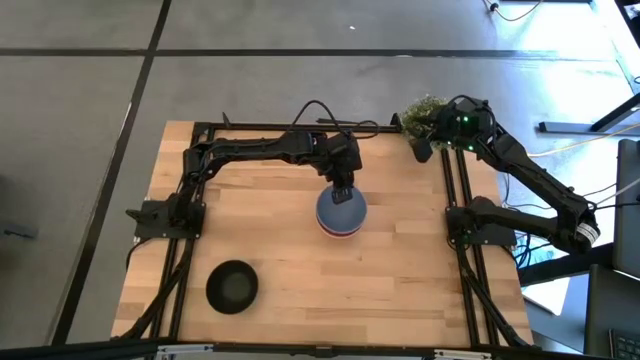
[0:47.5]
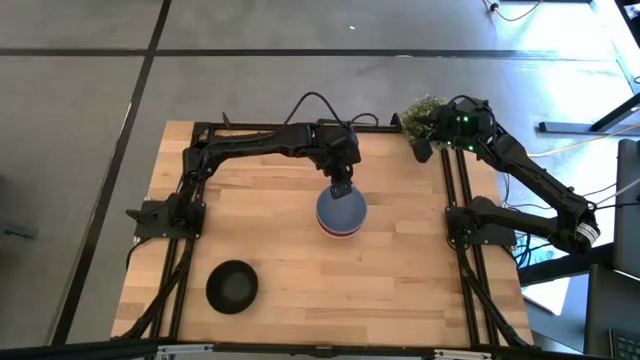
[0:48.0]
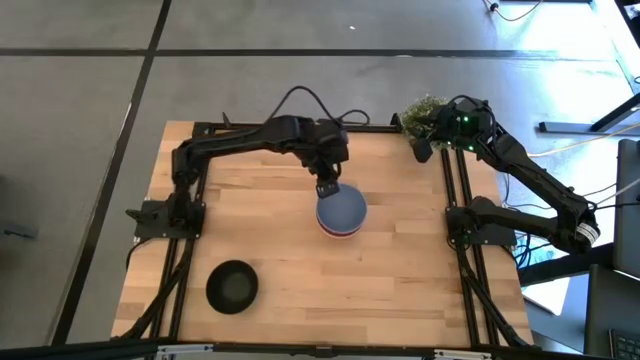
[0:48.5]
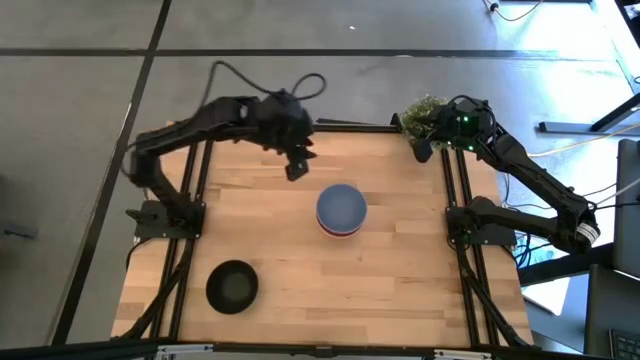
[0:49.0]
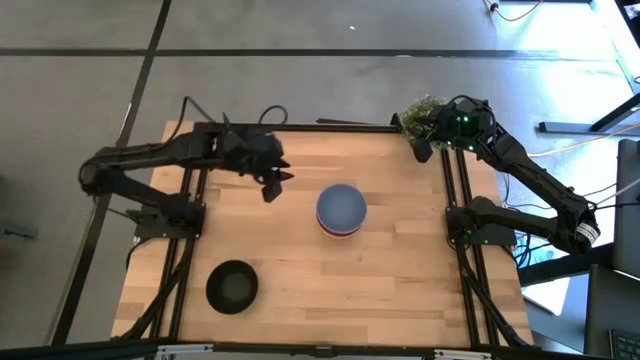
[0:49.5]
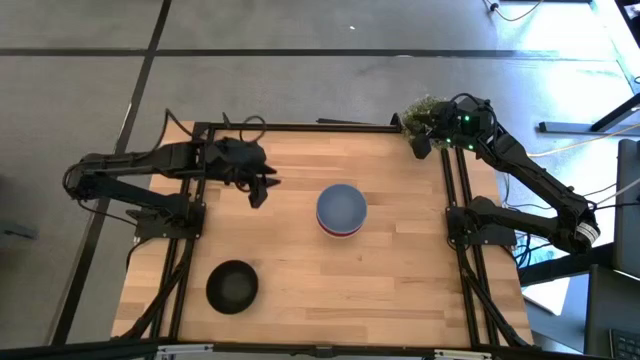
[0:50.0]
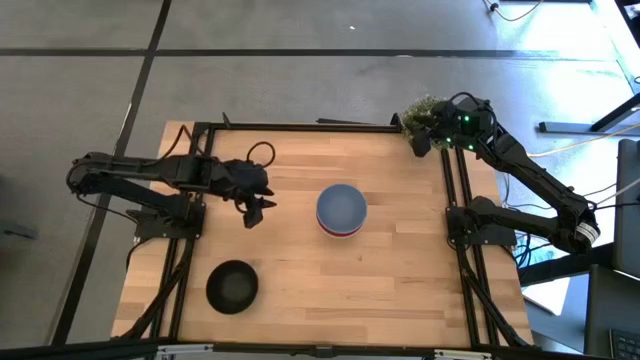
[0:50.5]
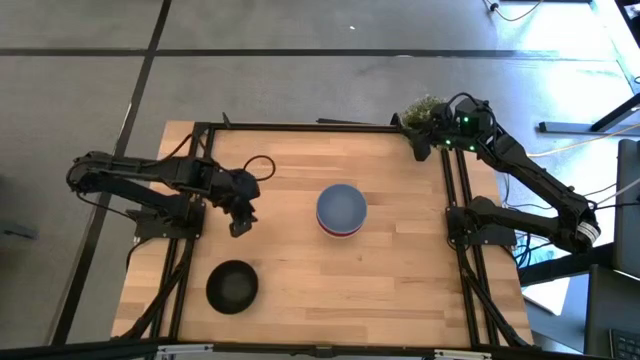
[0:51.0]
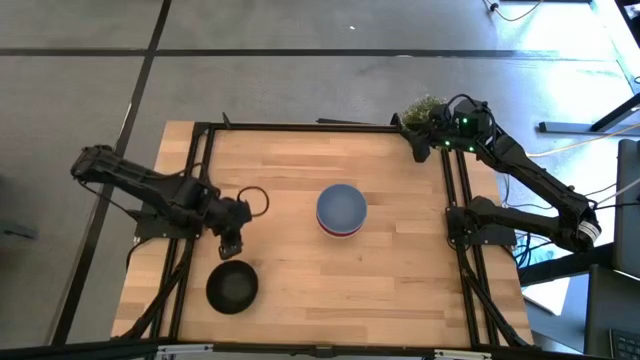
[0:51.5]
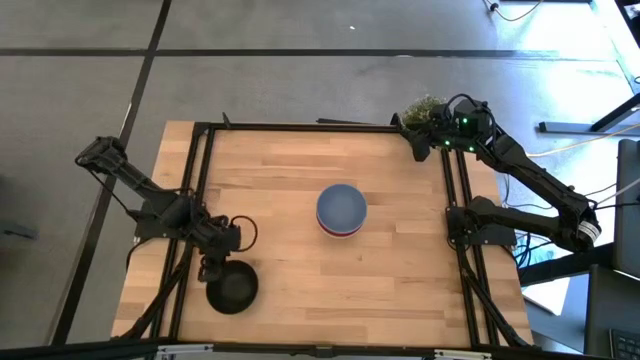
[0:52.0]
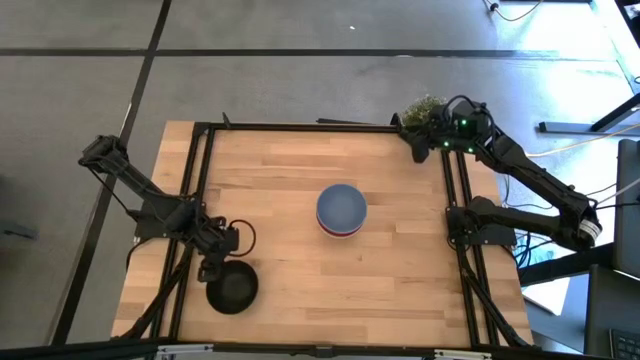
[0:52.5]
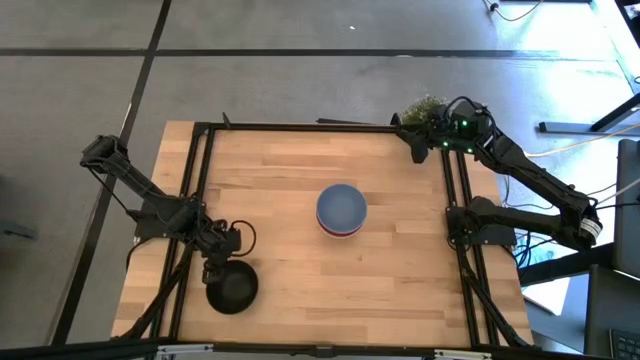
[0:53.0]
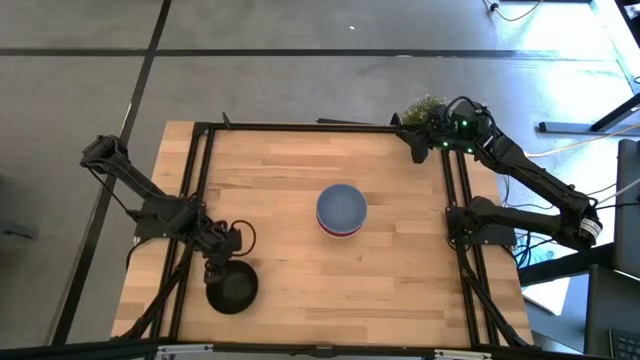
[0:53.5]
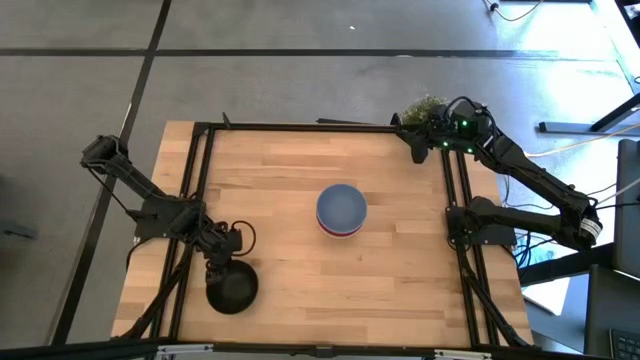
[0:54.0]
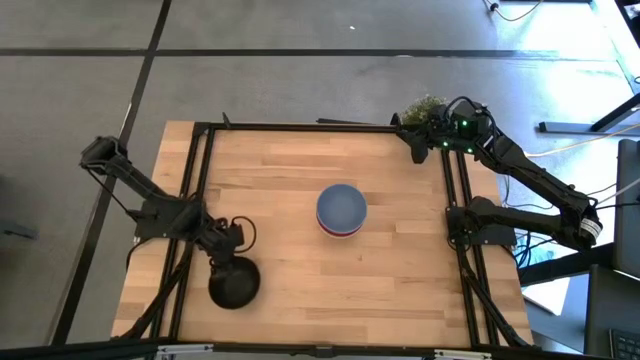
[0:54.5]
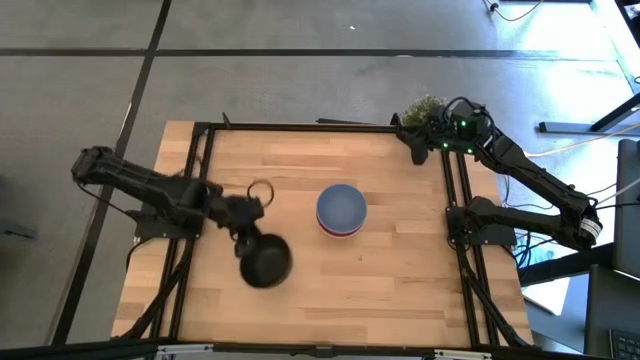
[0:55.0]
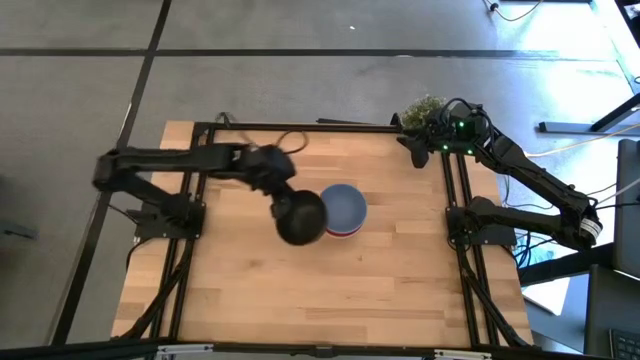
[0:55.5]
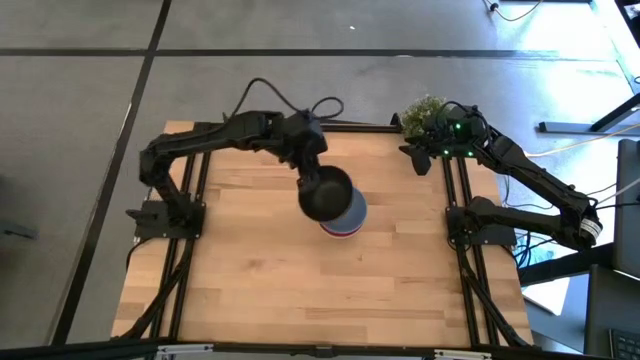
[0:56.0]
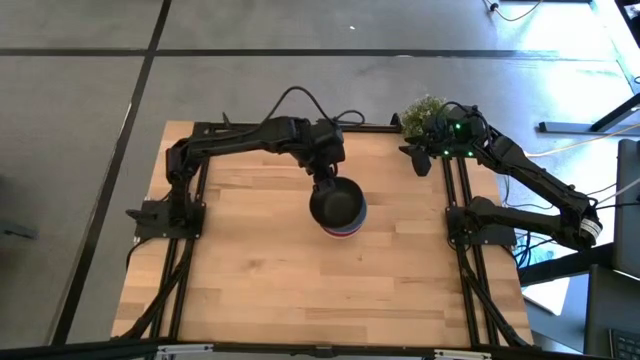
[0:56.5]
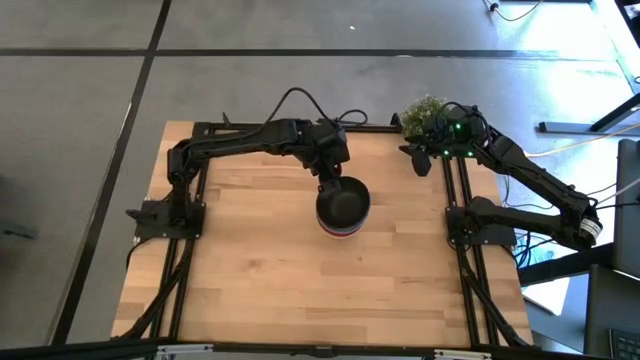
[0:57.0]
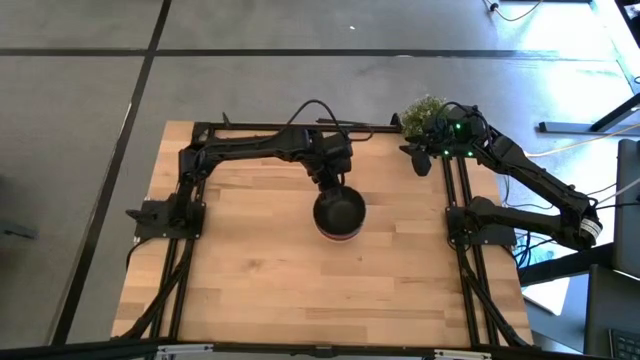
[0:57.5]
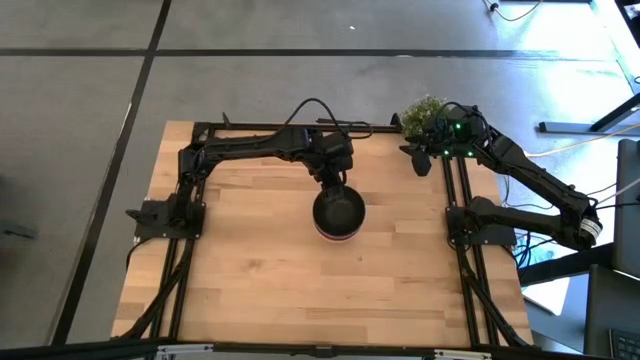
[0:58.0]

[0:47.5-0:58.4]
Task: Nest bowls inside each other
Stack the black bowl on top of the blue bowl

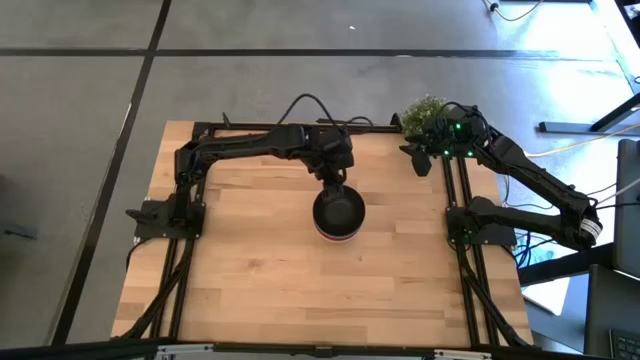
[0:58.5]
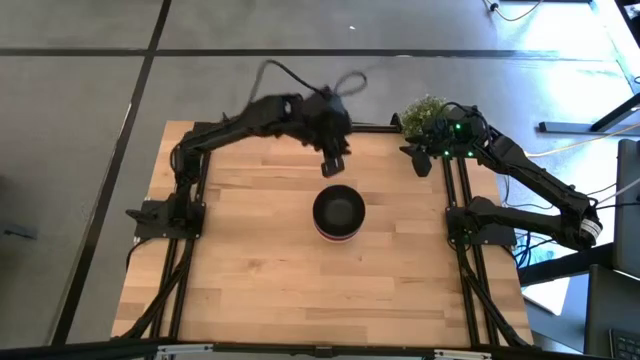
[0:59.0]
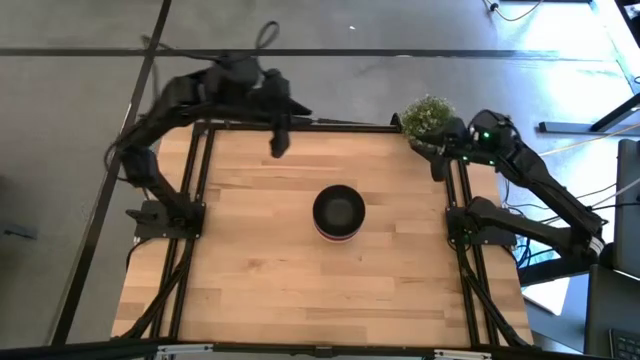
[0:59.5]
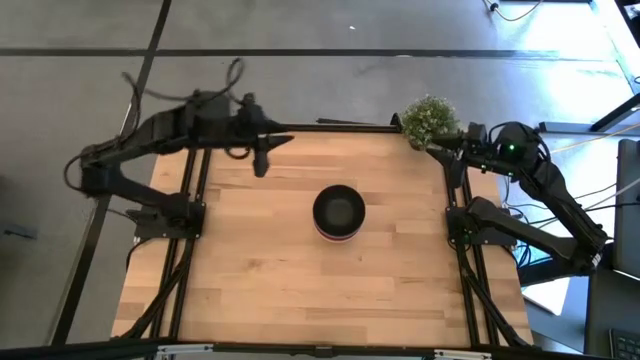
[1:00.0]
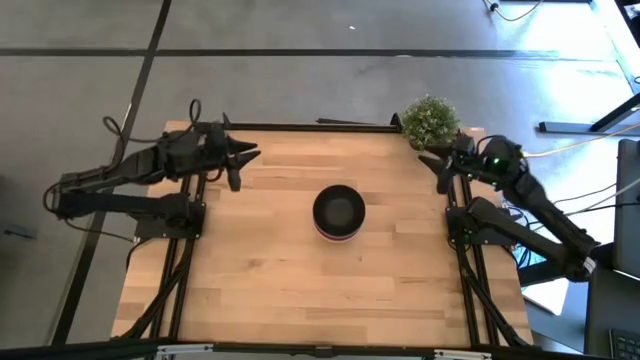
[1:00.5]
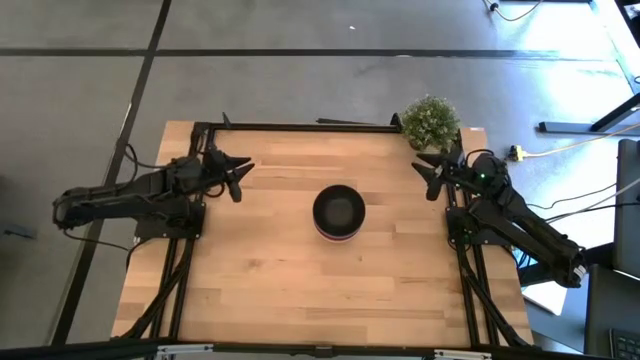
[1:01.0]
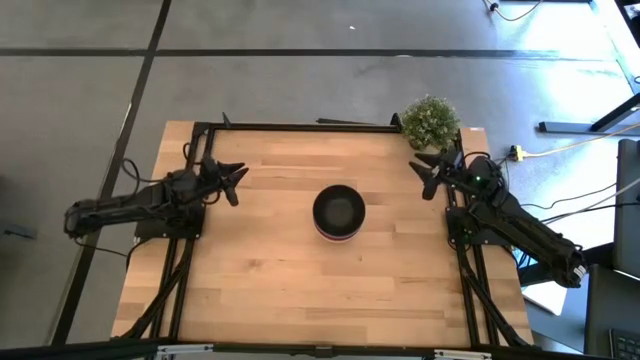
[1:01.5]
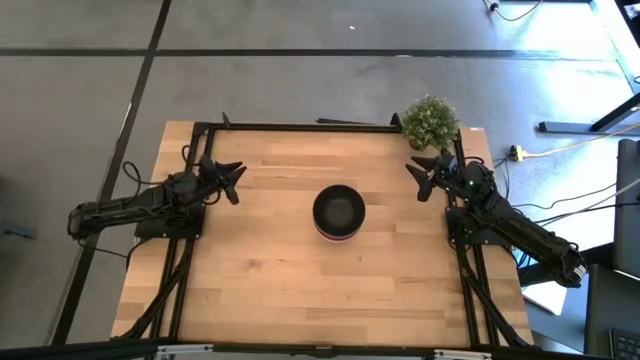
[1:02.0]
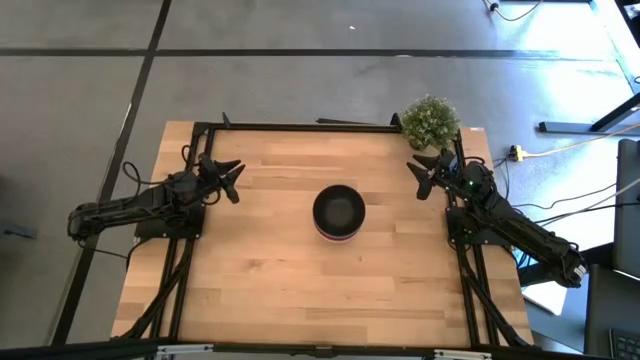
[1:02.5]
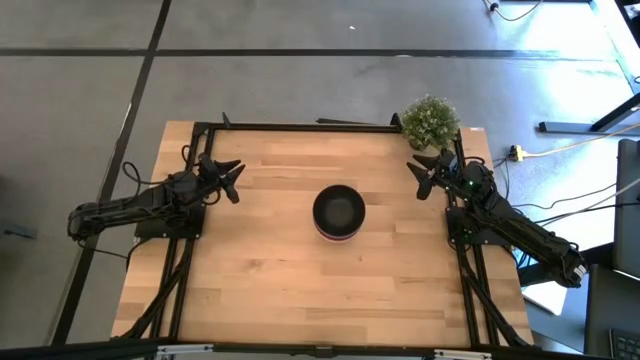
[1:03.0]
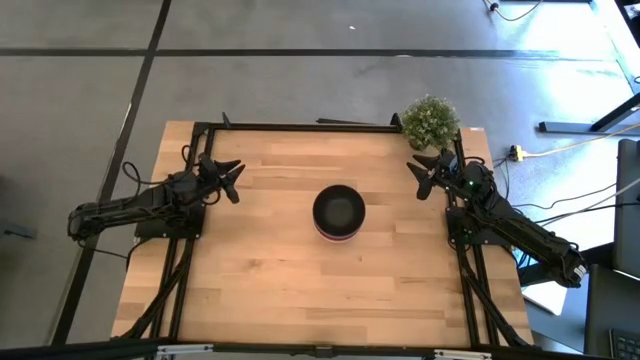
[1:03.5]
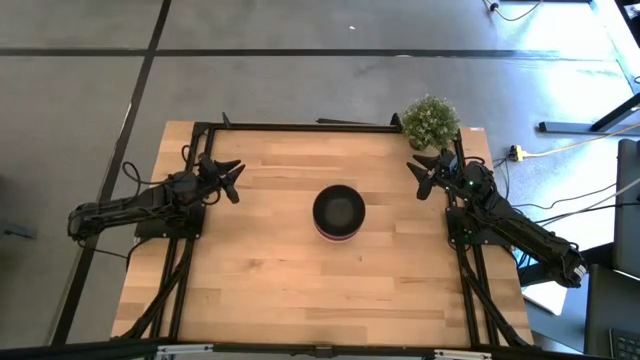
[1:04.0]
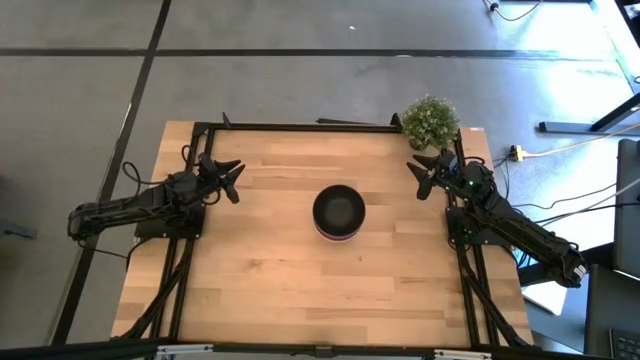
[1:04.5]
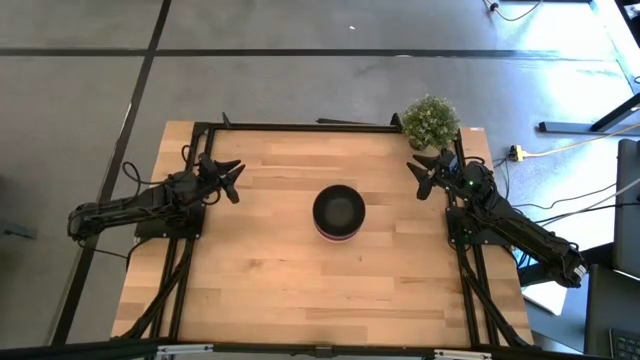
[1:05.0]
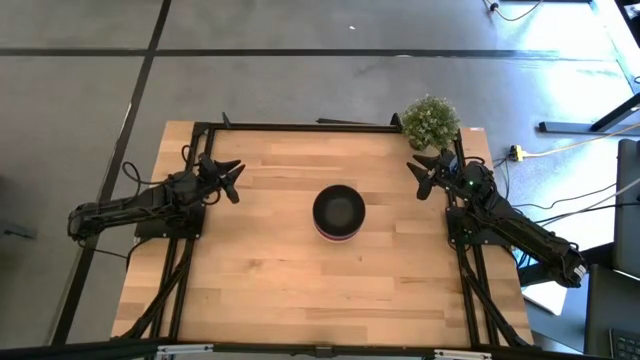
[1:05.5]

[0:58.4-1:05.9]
Return to Home Position

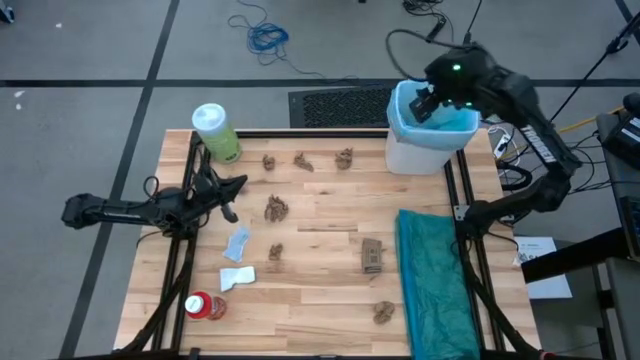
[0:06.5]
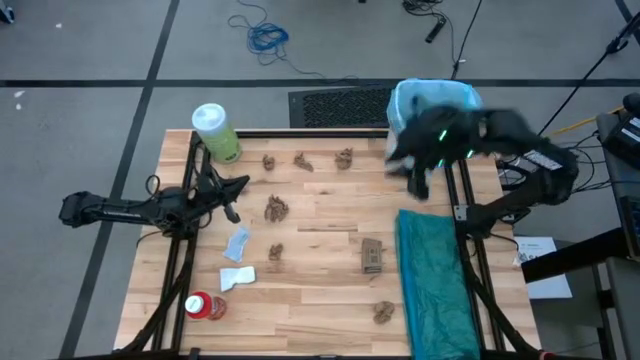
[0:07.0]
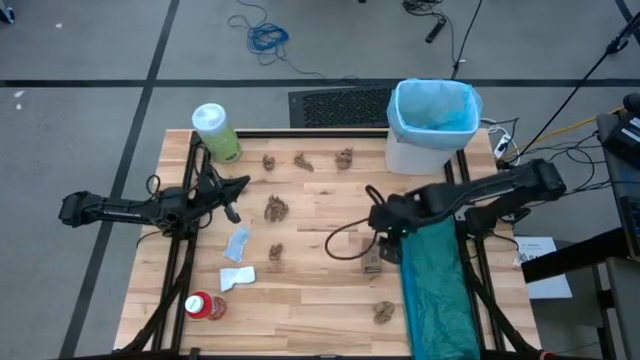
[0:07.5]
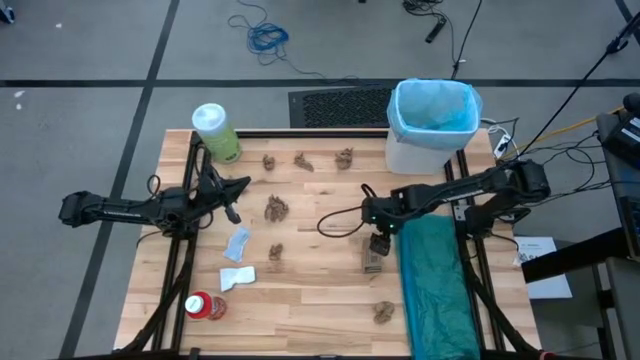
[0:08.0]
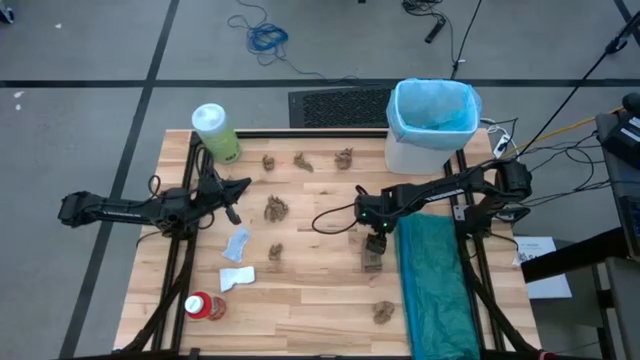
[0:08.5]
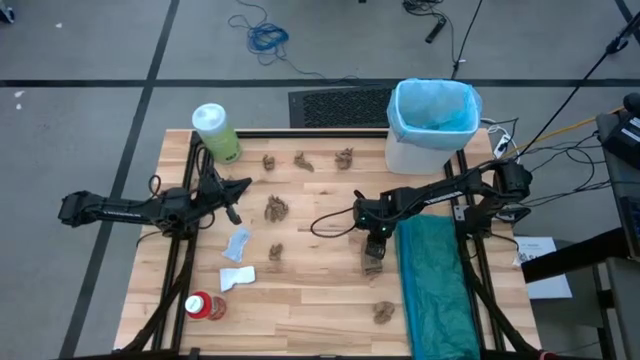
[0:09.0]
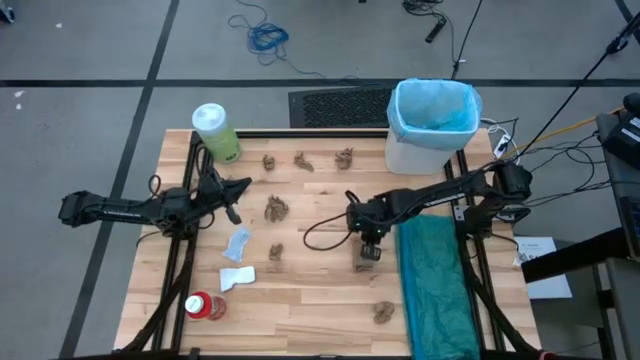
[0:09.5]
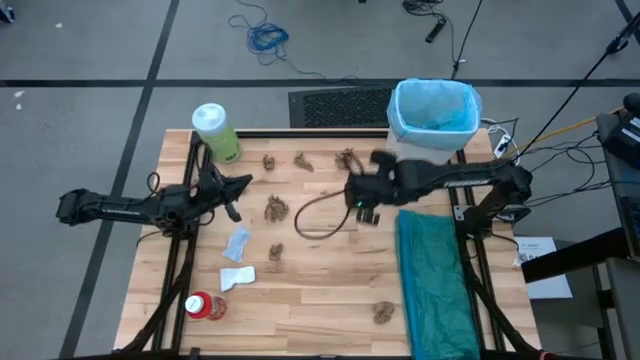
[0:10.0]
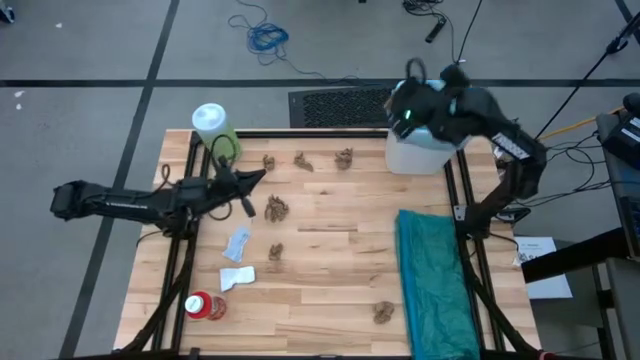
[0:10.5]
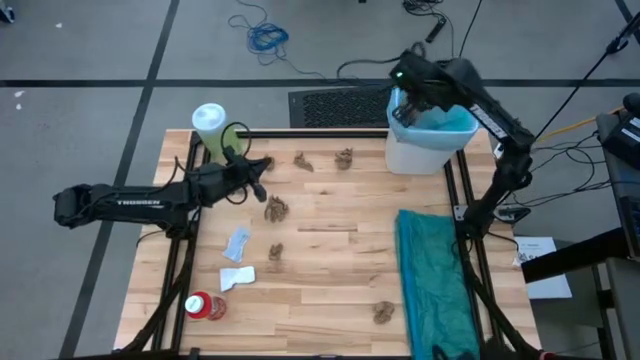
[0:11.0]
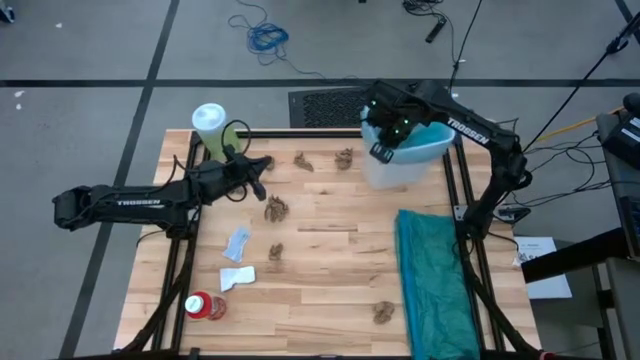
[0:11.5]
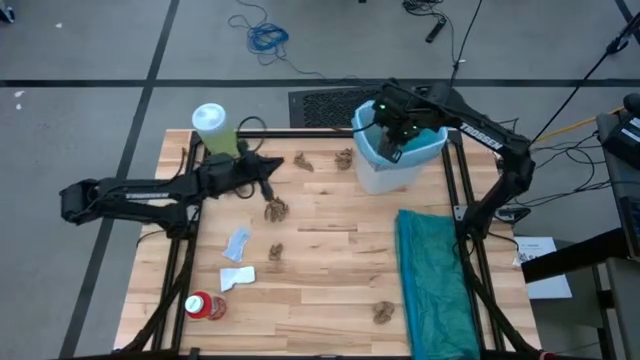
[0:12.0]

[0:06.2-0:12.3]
Task: place trash/remove bag and relplace
Put the brown paper trash into the trash bin
